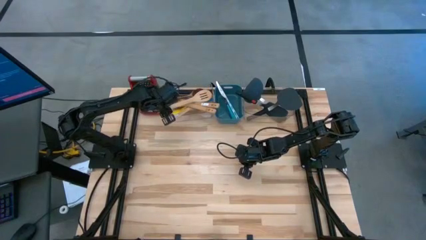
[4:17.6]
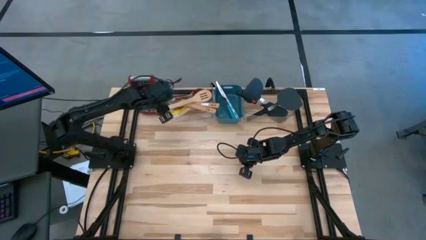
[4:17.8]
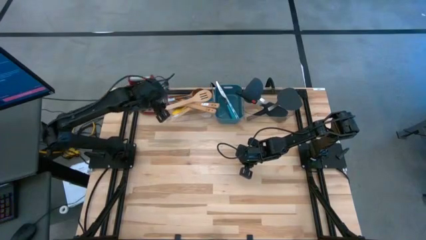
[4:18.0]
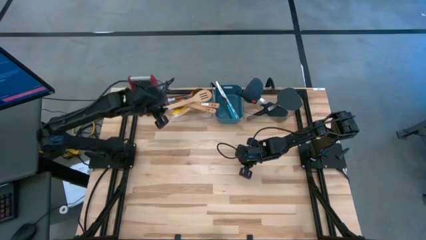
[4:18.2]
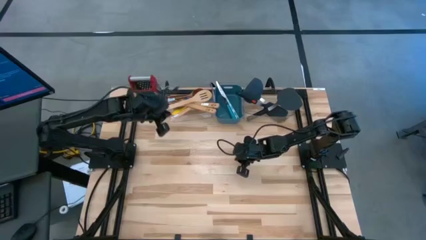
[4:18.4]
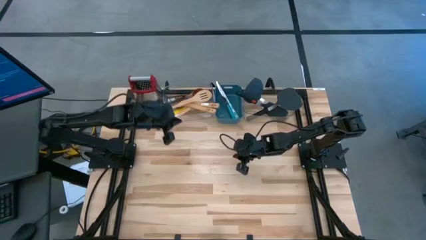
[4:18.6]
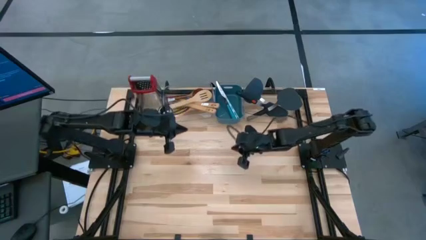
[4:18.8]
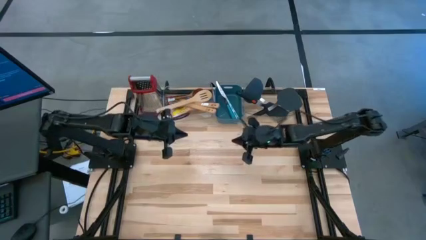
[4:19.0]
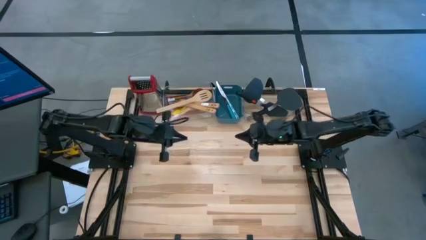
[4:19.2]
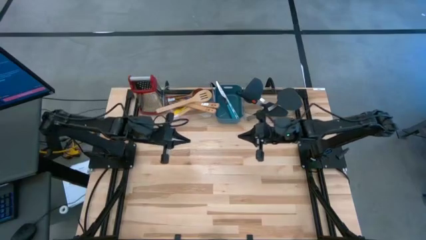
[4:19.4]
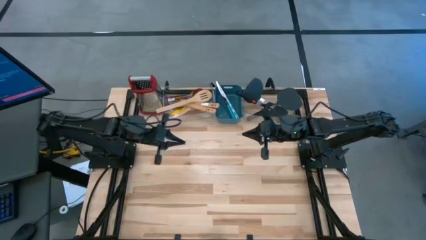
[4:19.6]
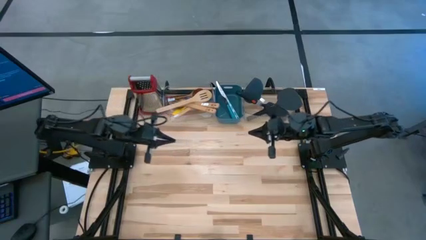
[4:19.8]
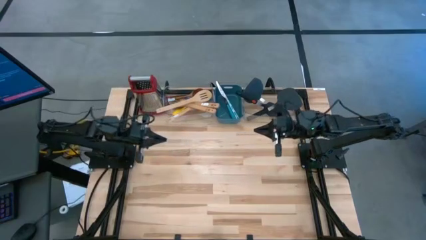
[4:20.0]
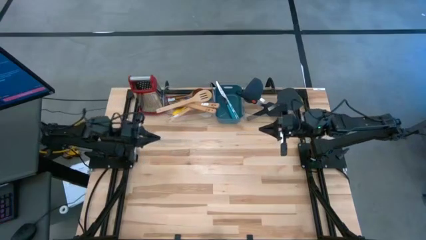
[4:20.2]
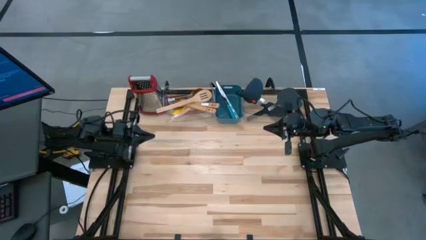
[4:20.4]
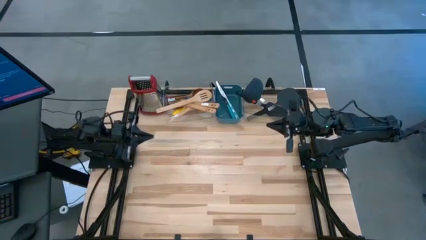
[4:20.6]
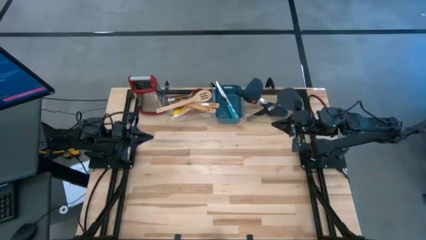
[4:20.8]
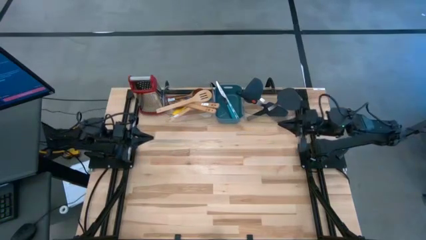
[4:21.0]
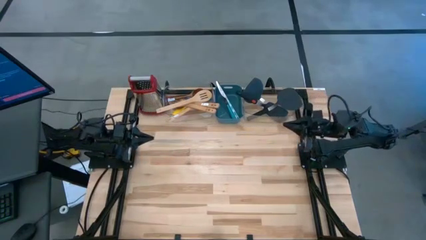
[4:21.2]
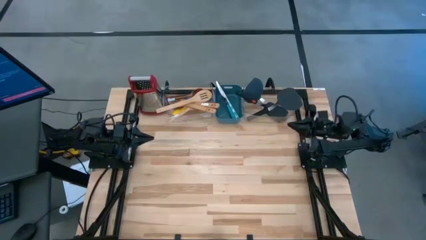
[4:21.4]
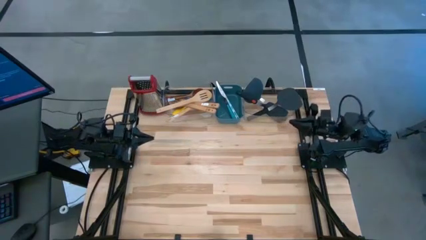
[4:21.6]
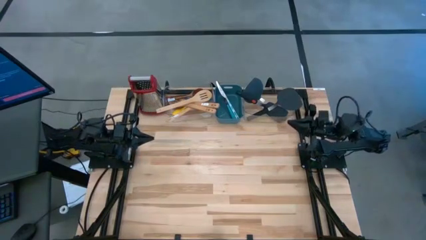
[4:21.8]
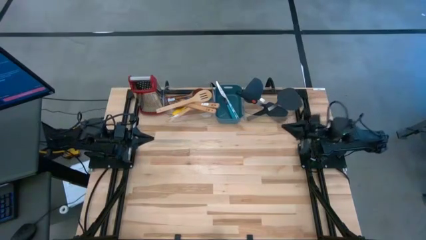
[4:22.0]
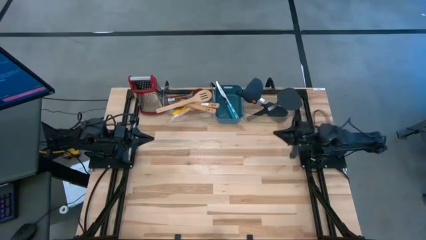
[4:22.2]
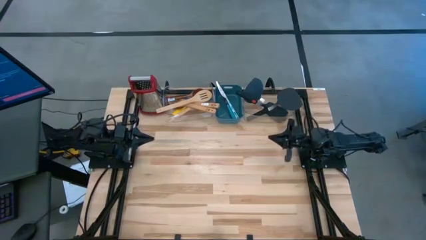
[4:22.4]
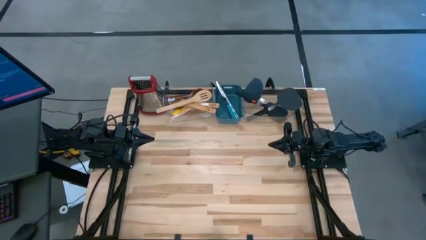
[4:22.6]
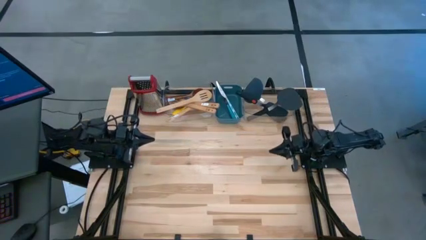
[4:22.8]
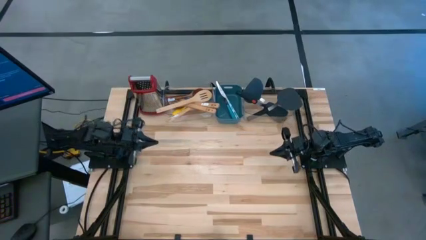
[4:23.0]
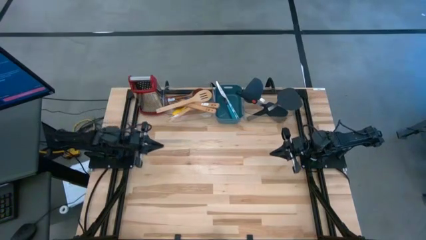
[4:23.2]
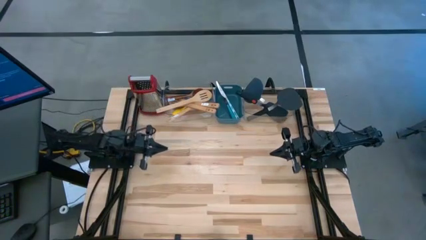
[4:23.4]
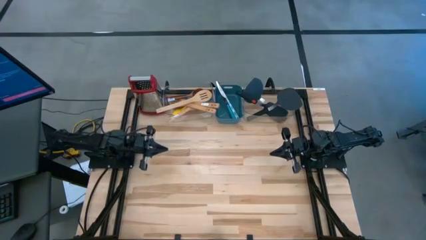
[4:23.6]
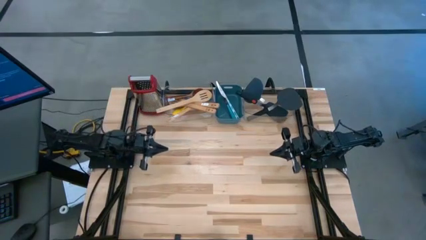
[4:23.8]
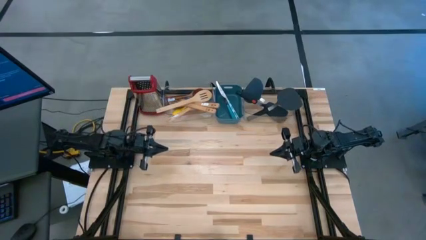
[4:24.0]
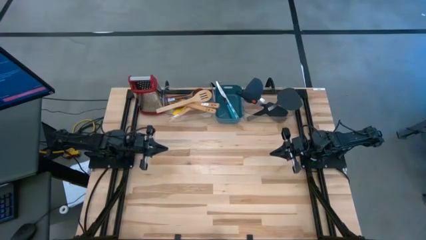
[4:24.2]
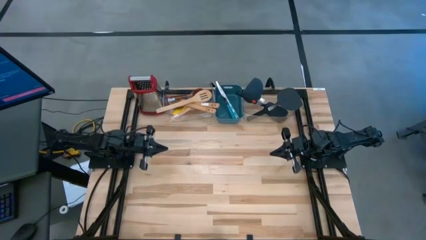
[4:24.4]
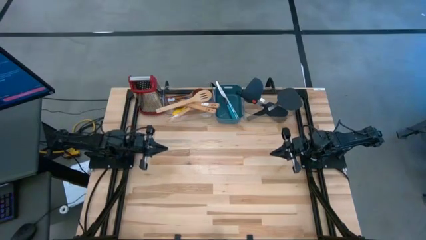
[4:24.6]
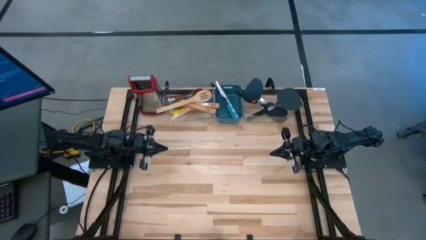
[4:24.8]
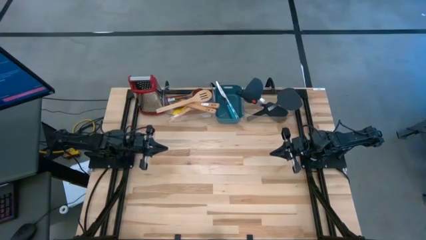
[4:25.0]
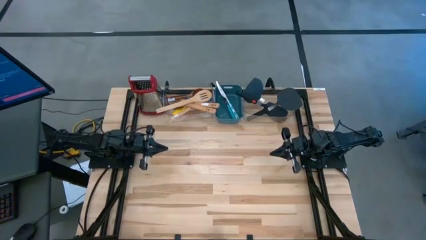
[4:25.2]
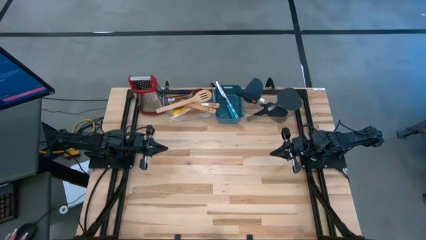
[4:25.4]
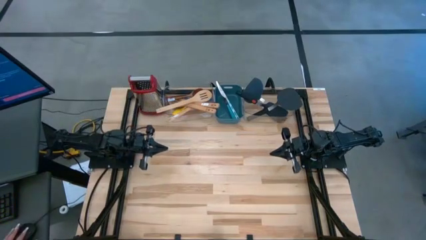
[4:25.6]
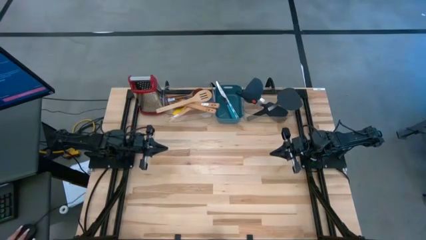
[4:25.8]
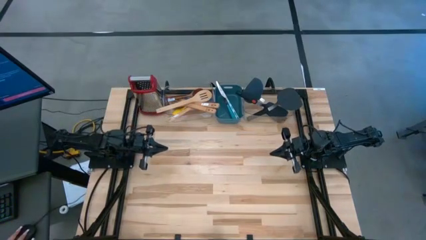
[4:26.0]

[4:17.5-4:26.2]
Task: Pick & Place Kitchen Items
Return to Home Position

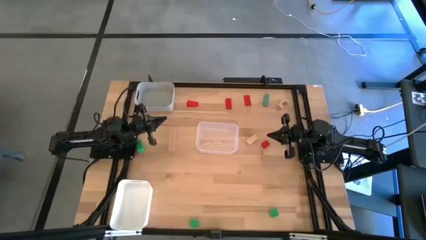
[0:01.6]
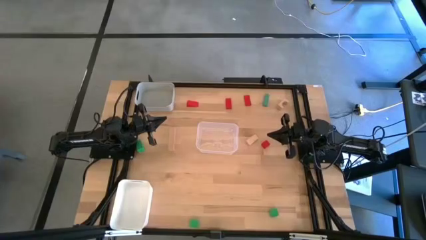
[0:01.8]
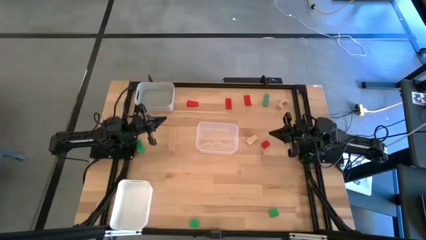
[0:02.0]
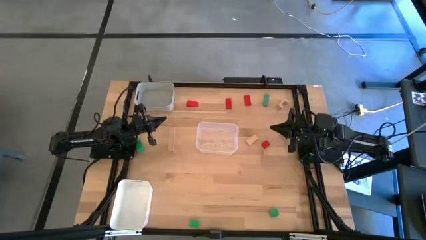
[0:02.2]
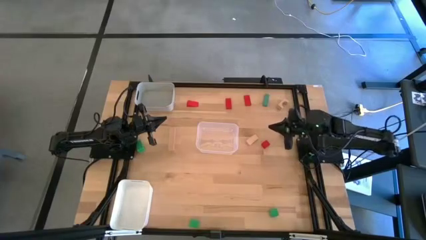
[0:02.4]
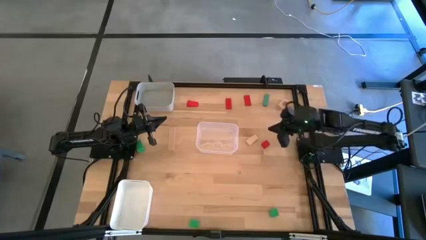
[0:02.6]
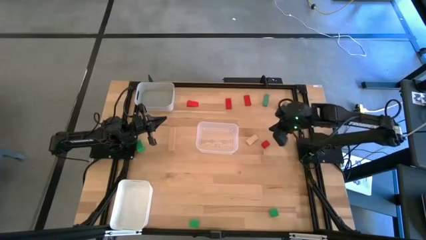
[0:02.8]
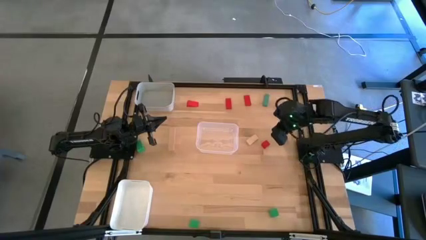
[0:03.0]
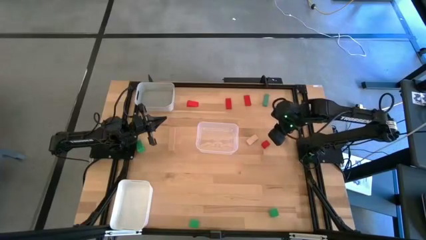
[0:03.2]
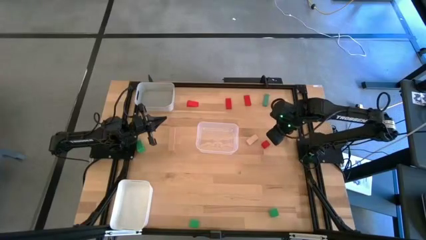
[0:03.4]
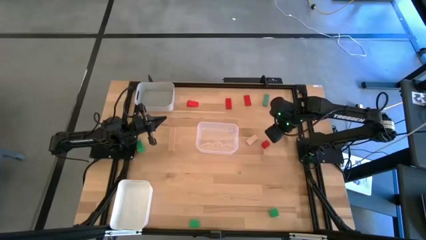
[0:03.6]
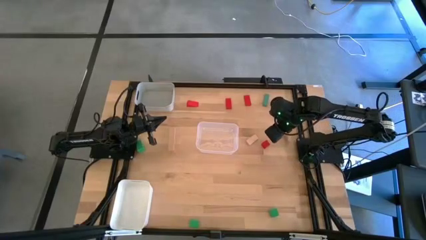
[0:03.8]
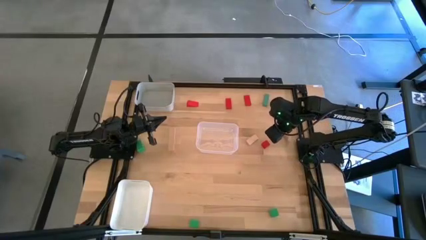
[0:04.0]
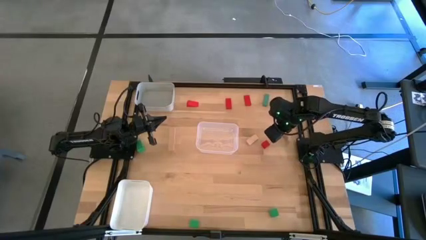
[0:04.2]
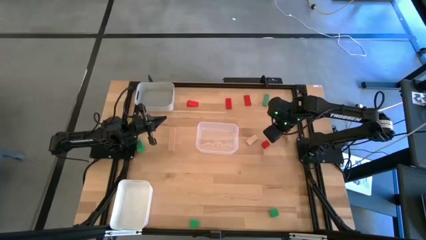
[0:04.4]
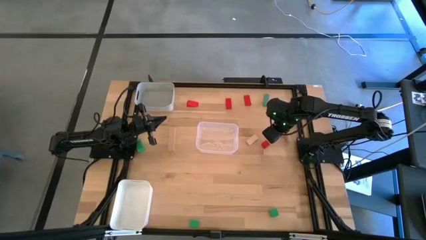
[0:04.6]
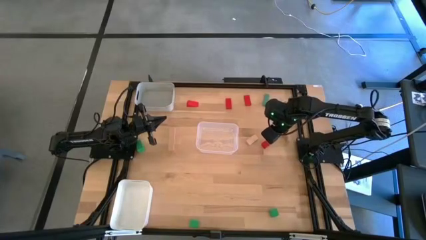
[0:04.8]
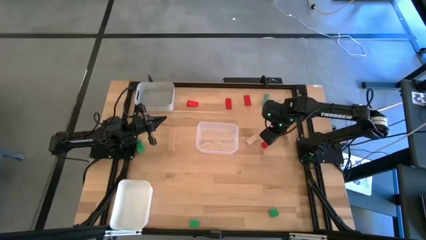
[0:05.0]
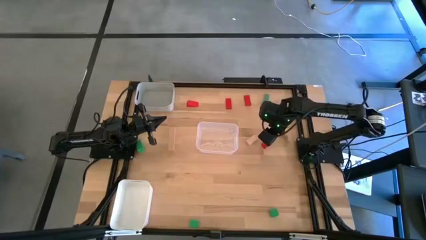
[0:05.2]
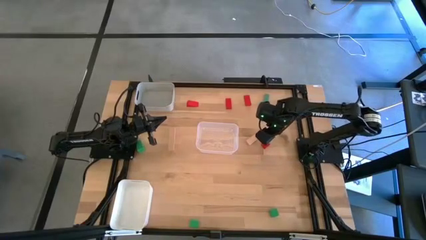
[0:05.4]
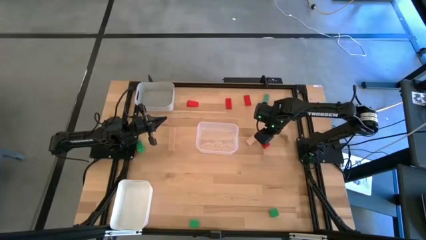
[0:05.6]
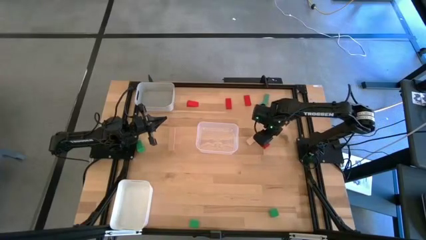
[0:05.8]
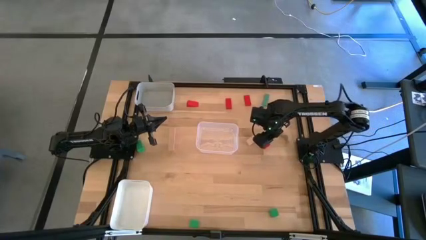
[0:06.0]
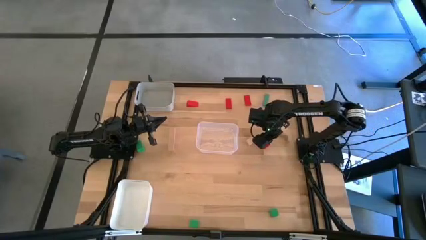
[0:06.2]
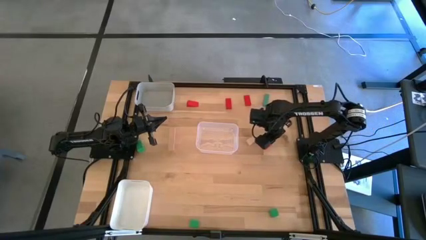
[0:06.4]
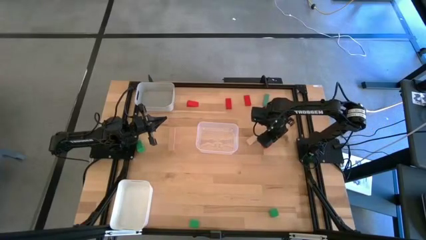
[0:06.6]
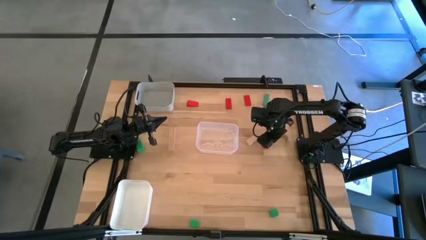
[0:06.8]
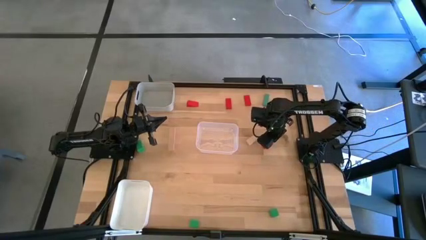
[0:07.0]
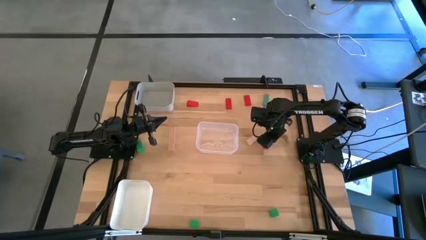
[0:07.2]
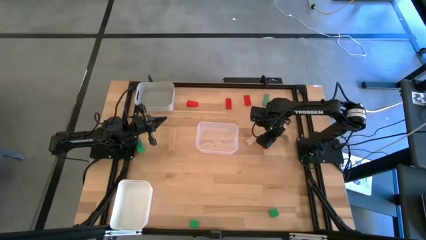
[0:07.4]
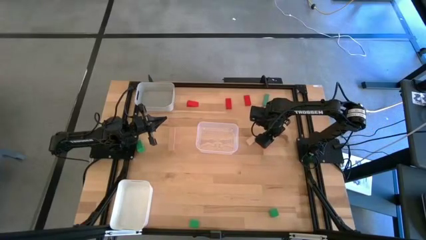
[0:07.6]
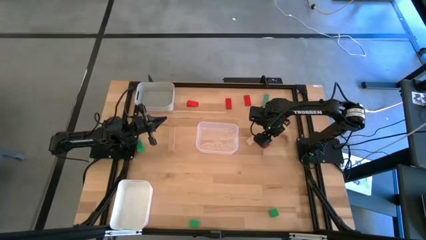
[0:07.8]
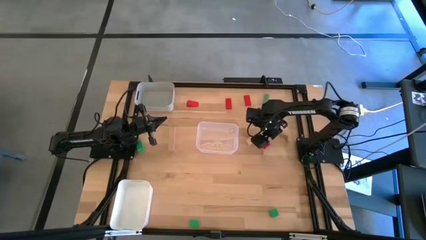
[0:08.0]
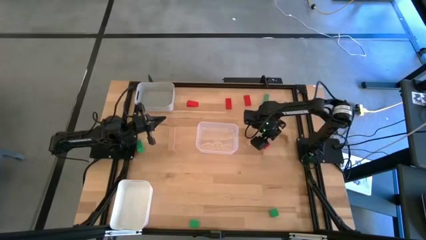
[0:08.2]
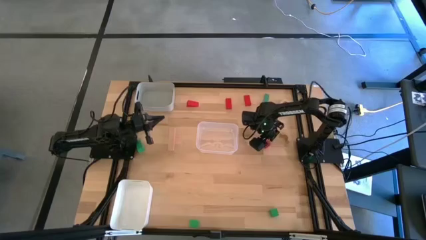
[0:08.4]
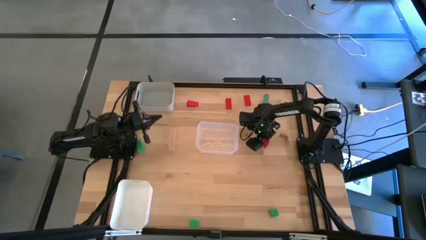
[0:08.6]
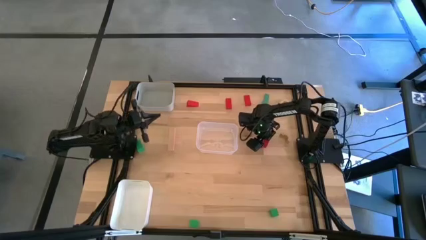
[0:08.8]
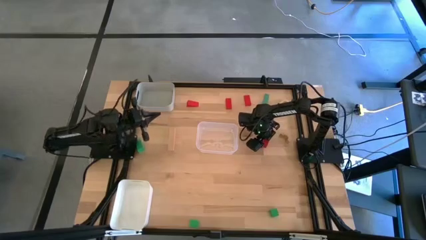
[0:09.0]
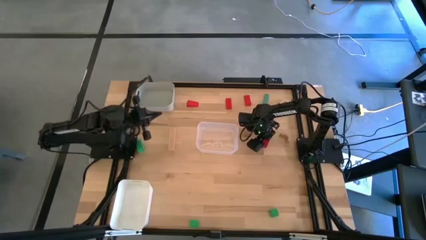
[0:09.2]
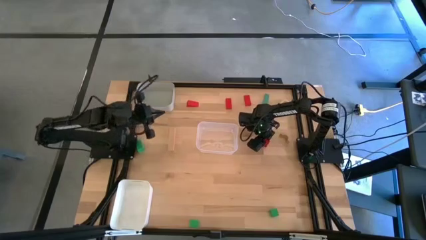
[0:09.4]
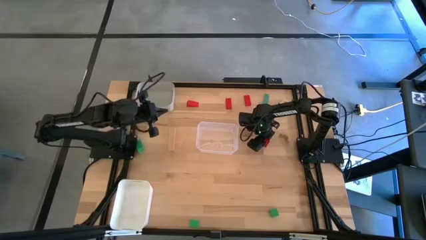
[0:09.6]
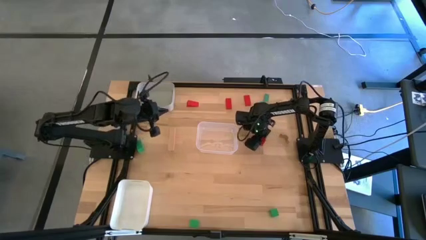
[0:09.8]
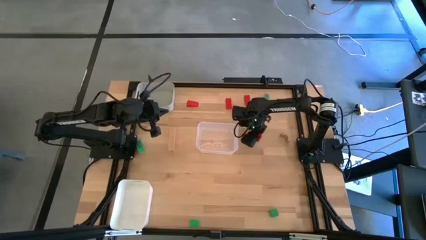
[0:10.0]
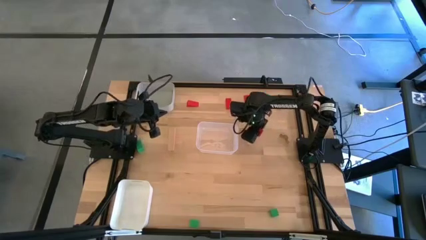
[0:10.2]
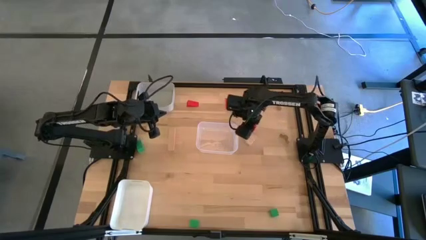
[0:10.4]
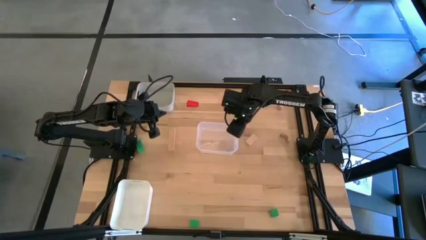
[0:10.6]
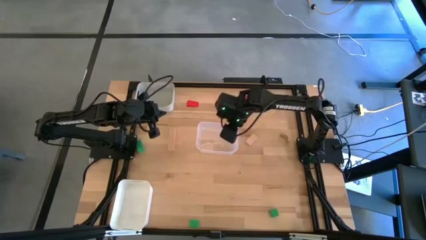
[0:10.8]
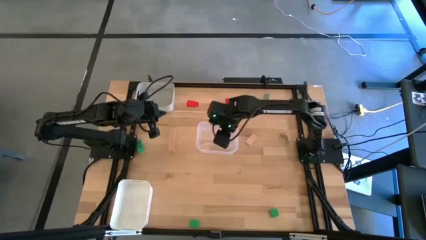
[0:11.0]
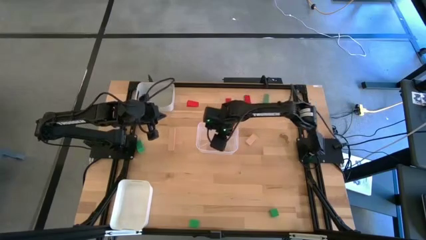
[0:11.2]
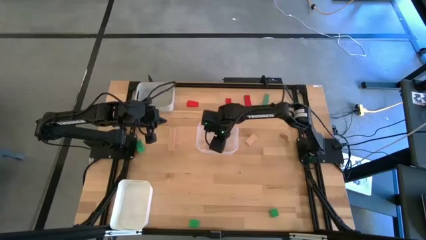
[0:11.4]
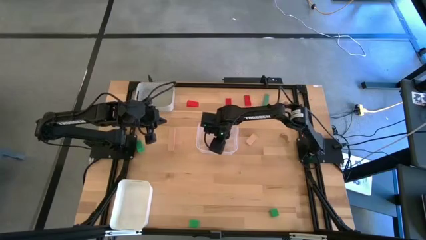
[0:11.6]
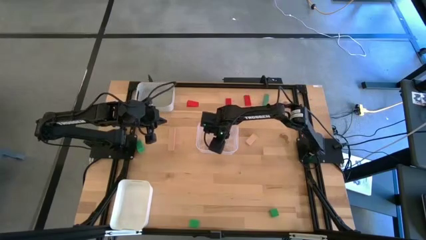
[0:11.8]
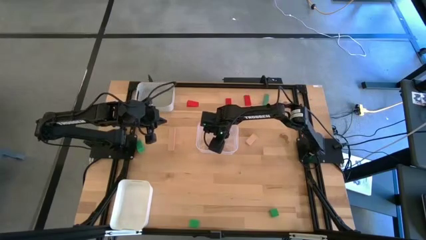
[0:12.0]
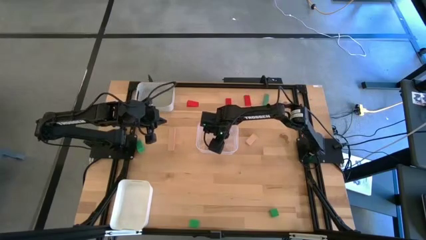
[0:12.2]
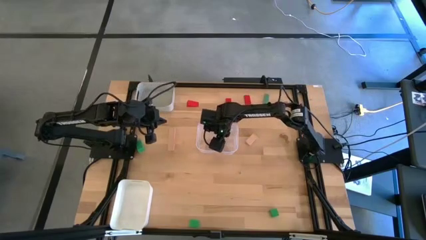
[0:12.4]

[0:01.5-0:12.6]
Task: Sort & place blocks by color
Put the red block into the transparent bin
